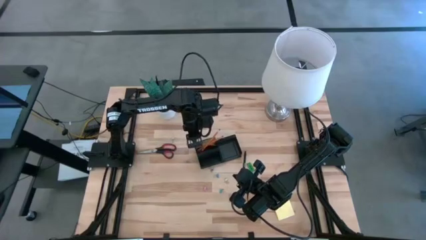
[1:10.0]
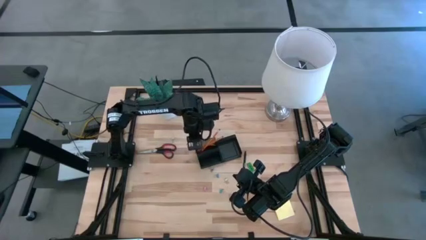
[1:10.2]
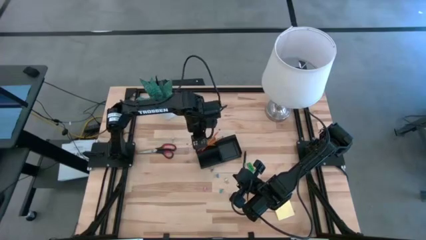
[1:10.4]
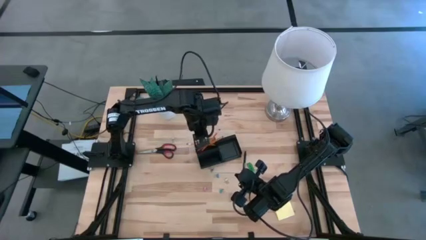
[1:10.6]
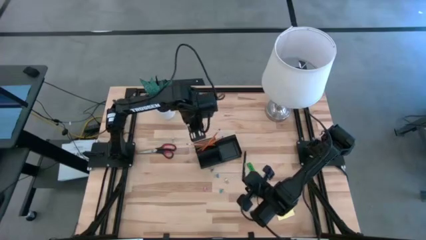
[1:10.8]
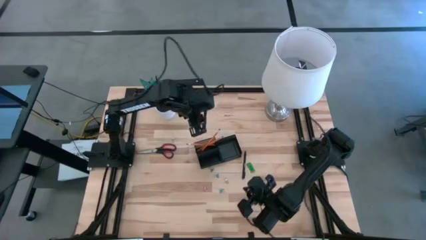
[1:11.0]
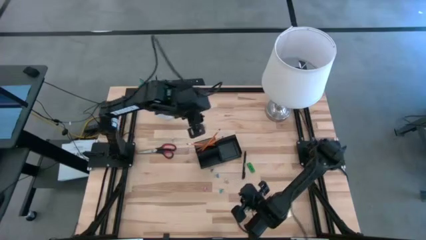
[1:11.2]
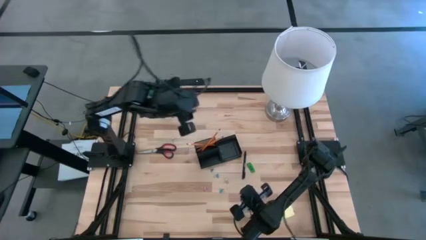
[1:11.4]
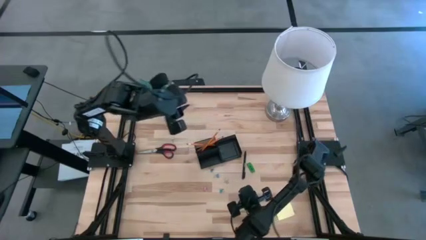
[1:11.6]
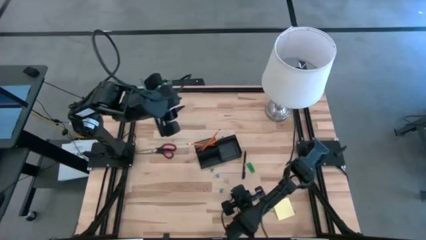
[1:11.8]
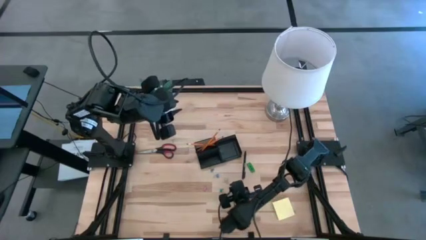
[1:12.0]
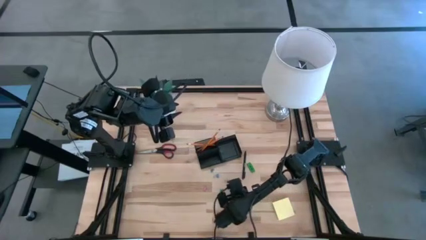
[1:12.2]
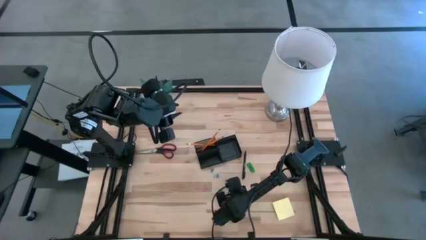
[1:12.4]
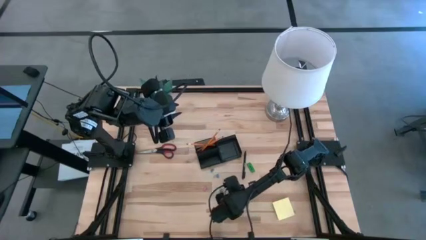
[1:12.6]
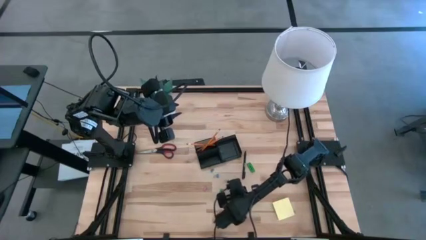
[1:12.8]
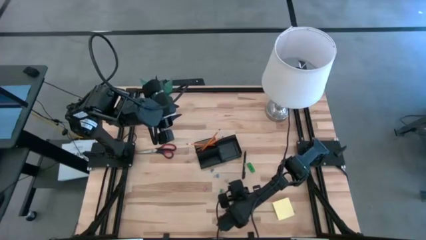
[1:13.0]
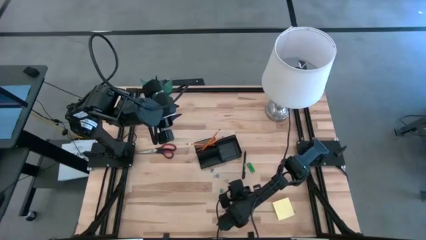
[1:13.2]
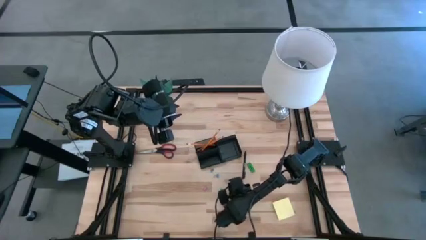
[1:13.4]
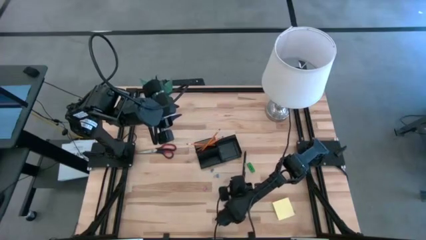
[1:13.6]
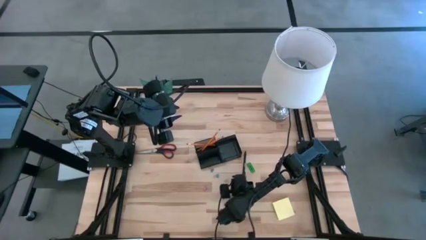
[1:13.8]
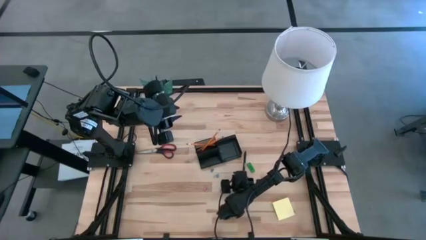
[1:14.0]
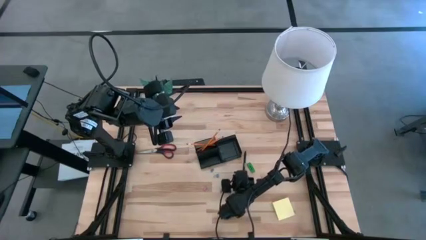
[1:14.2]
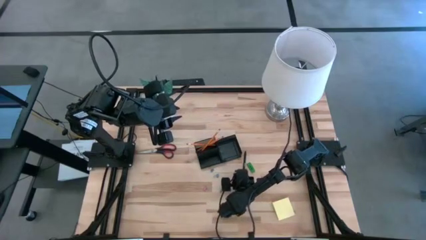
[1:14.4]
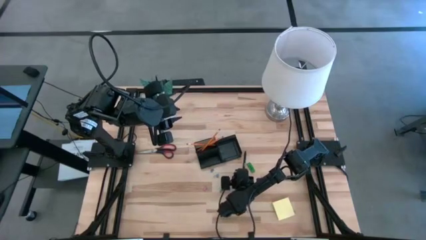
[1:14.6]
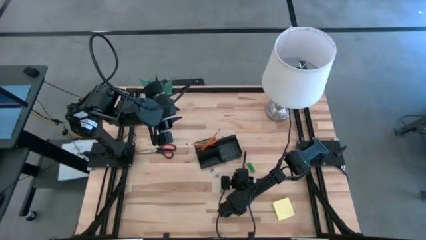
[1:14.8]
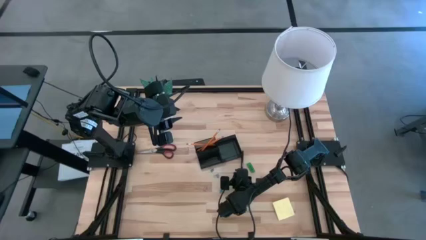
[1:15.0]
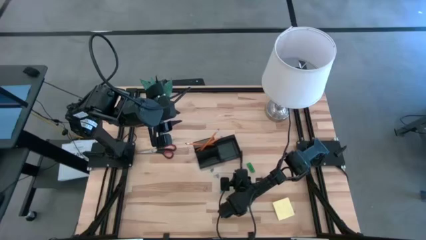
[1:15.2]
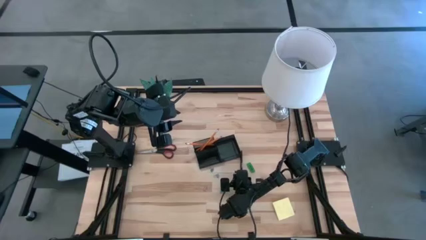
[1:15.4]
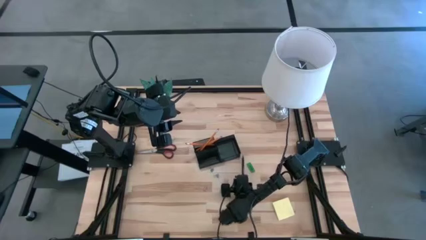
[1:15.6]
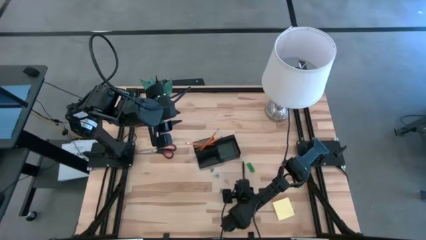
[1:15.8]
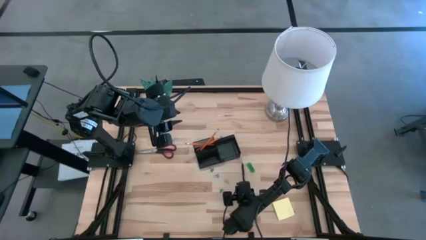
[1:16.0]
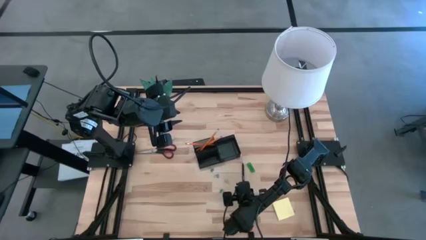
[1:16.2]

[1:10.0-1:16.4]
Task: Pick and place office supplies into organizer
Put the black pen into the black desk organizer

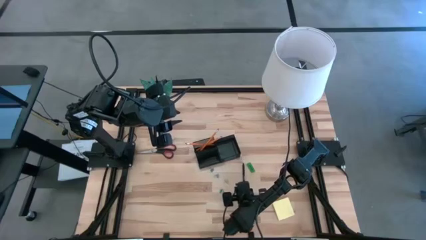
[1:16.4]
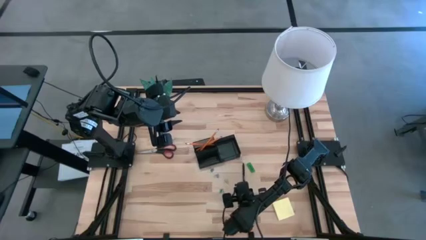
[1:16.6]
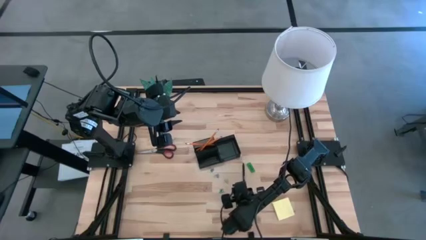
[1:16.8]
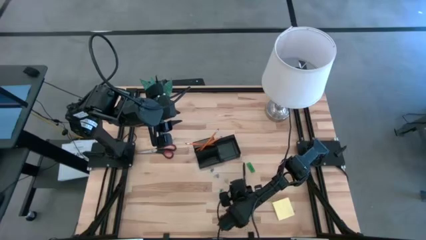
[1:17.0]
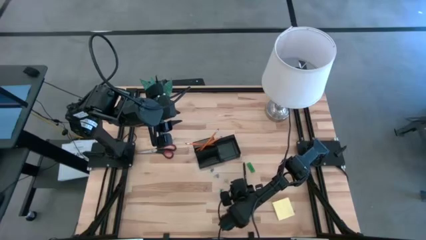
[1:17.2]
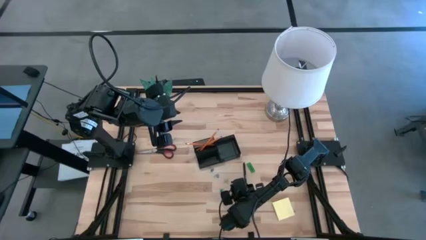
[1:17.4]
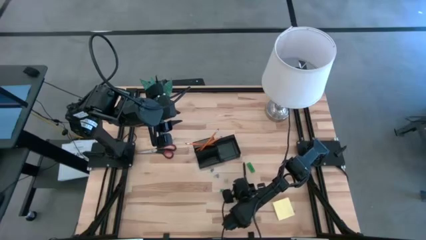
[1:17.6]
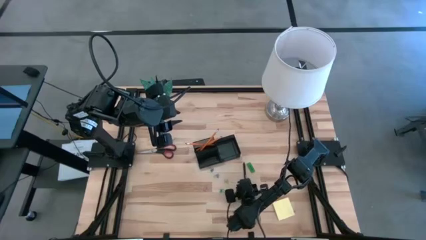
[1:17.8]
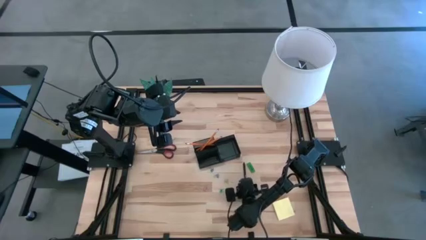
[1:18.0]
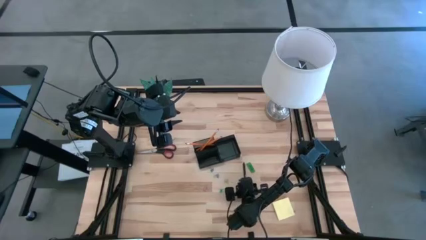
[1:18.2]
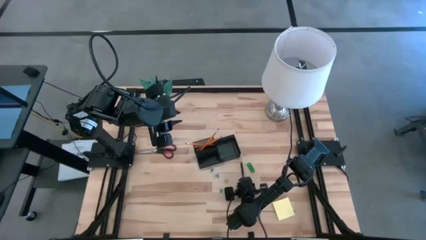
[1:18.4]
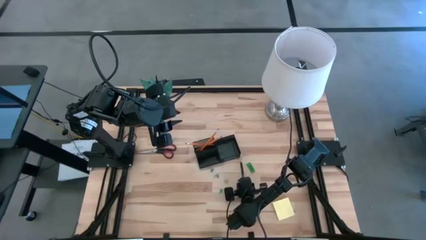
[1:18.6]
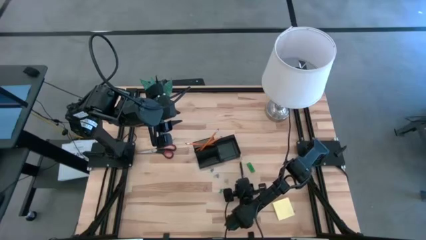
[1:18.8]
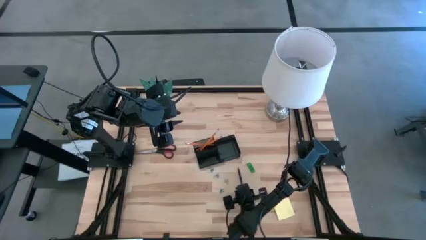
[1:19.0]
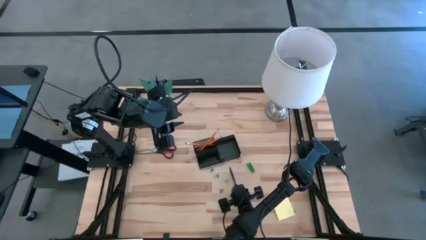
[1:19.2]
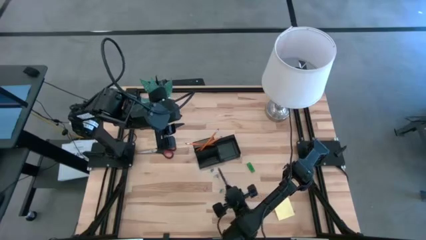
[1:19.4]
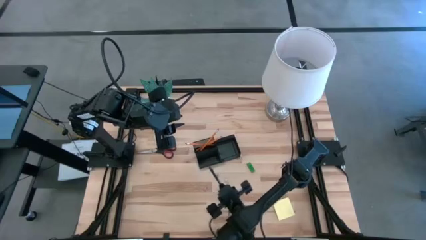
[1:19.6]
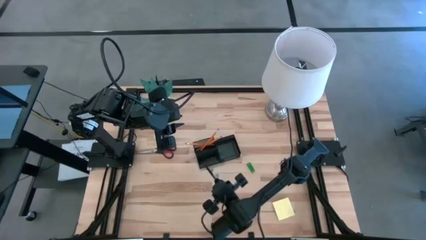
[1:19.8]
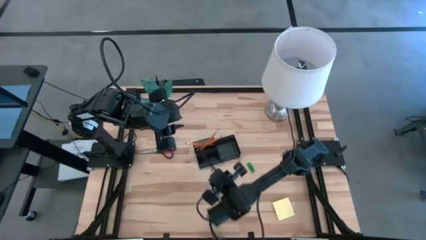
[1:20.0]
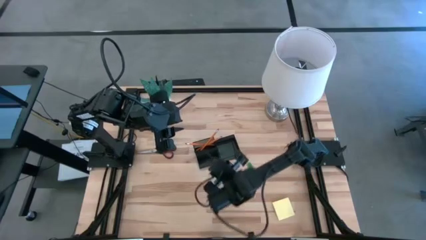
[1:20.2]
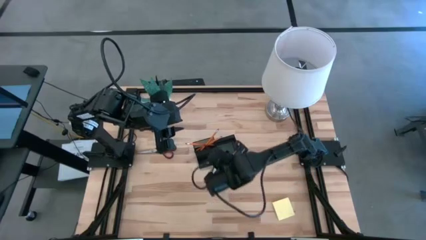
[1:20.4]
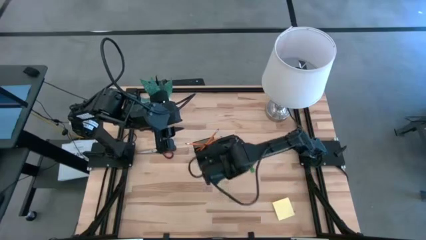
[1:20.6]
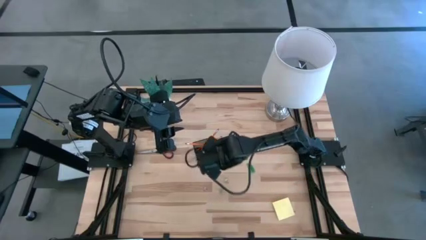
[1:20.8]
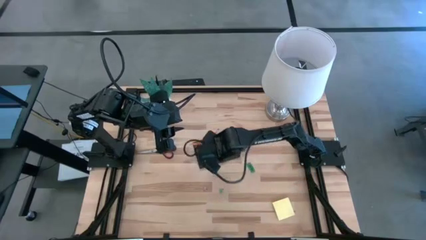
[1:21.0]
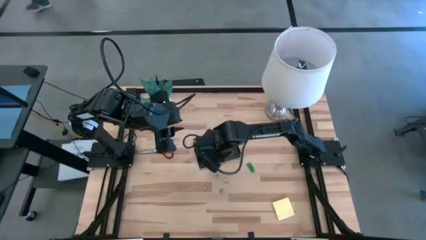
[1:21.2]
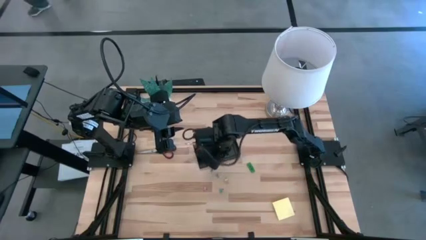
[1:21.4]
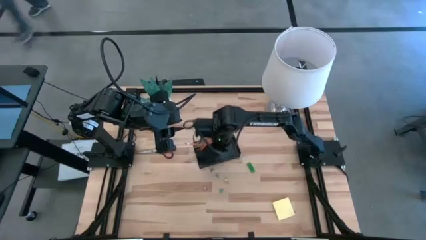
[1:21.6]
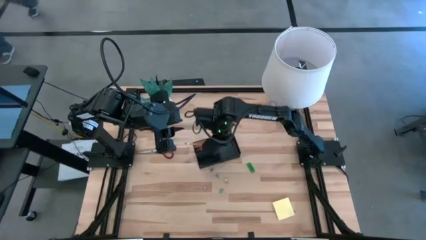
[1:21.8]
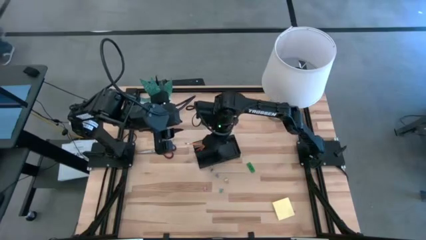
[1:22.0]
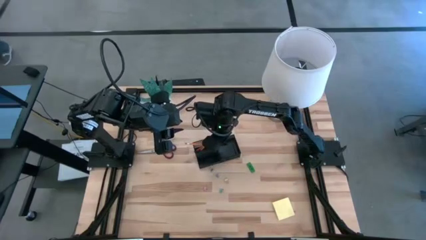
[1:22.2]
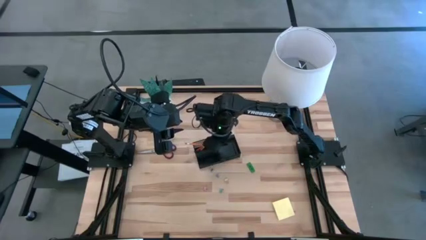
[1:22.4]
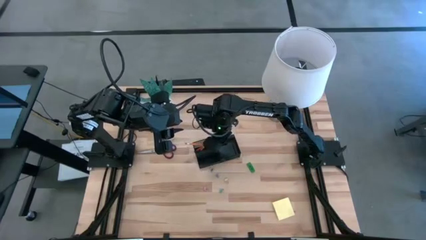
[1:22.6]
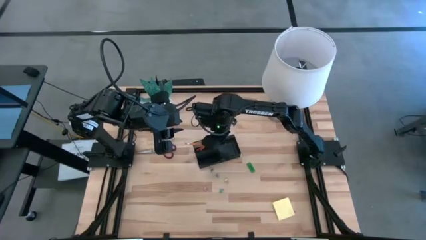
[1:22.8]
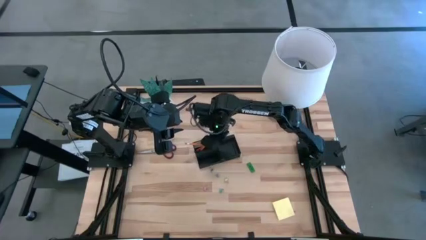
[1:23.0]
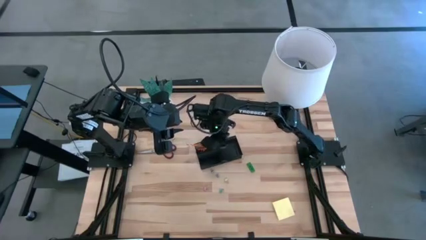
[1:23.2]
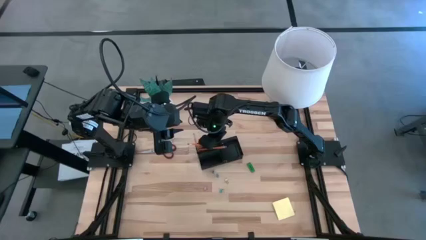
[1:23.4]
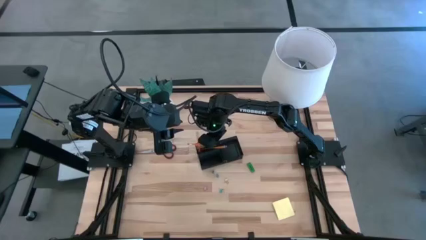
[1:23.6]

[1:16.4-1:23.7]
Put the black pen into the black desk organizer
